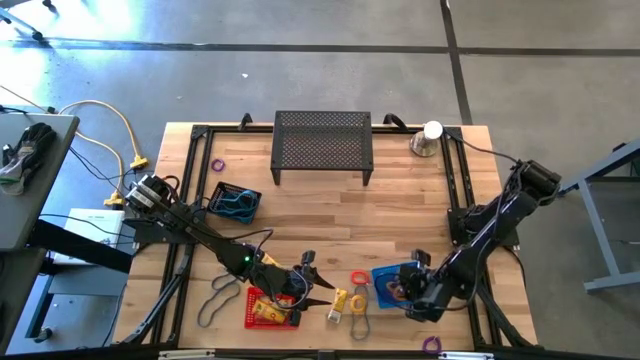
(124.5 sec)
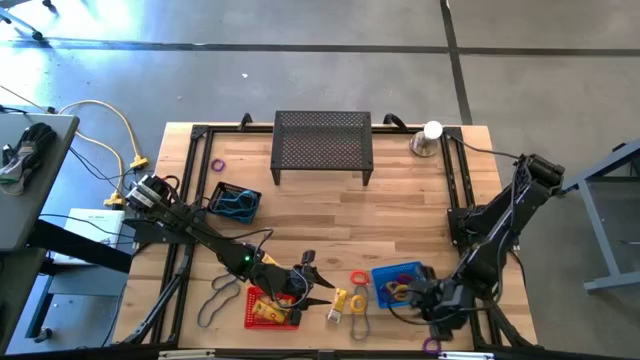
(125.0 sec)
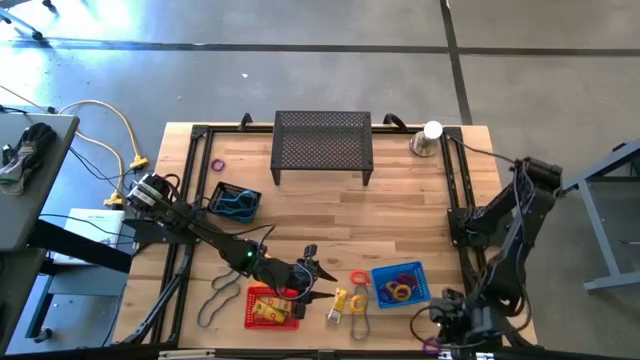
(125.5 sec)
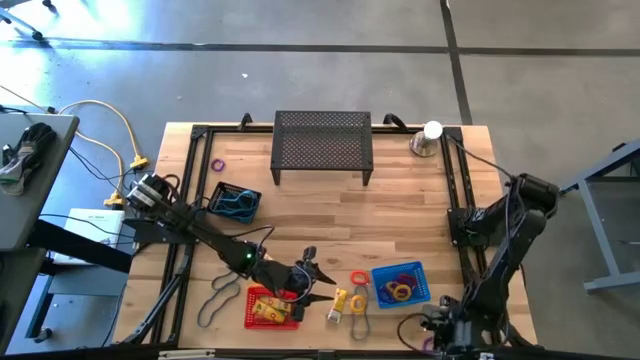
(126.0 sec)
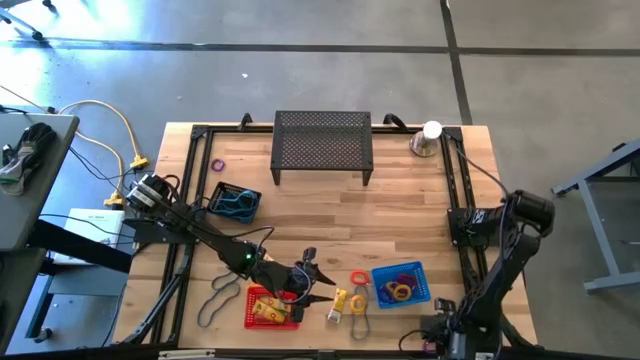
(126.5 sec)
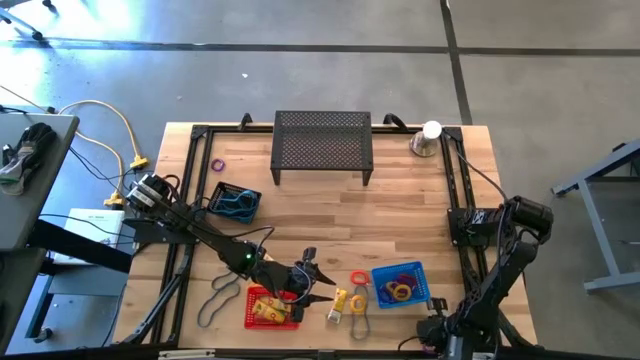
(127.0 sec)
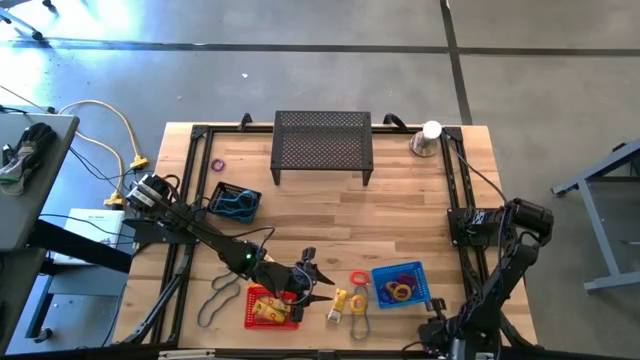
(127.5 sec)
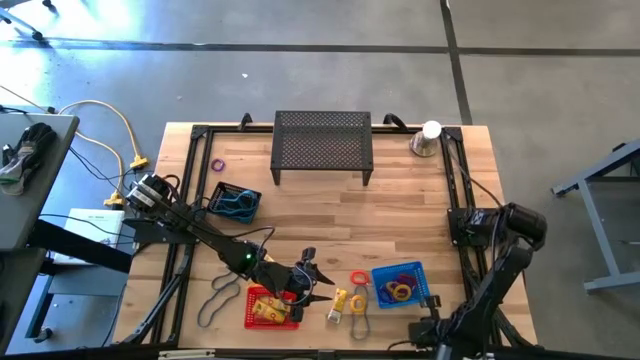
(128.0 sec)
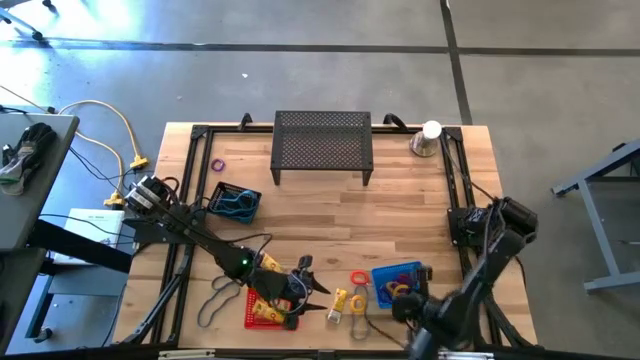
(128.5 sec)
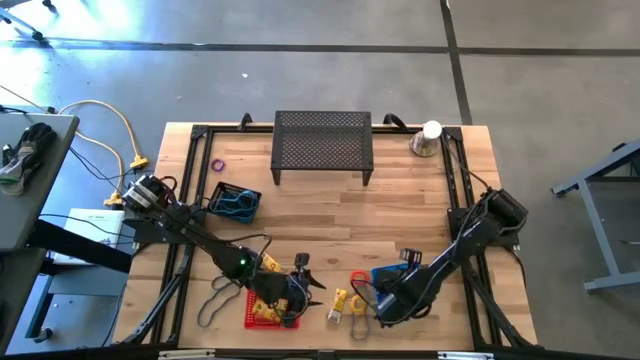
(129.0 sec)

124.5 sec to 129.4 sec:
Task: Pick & Place Office Desk Supplies
Put the violet spring keychain into the blue bin

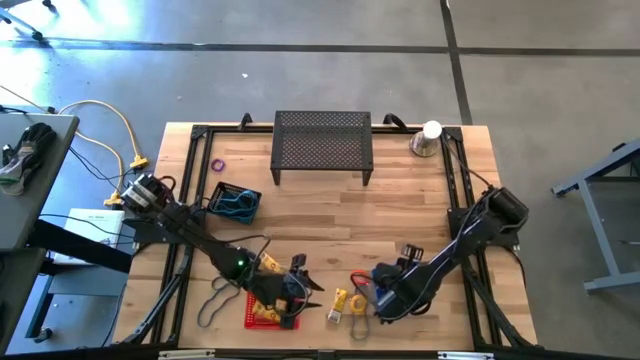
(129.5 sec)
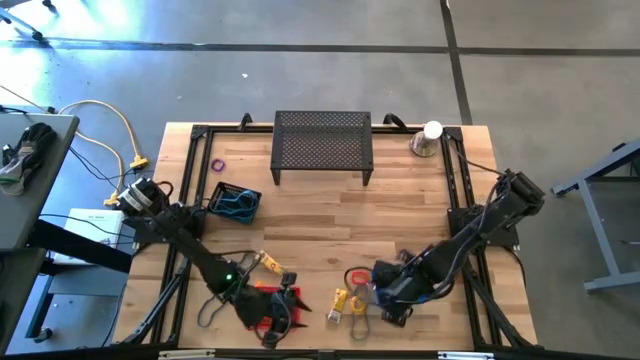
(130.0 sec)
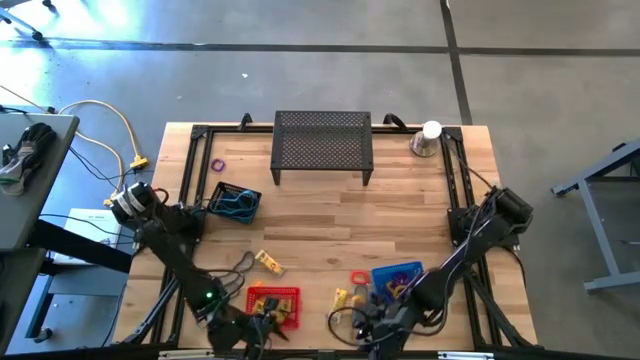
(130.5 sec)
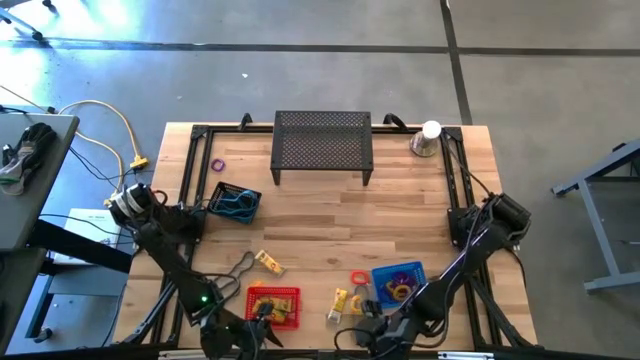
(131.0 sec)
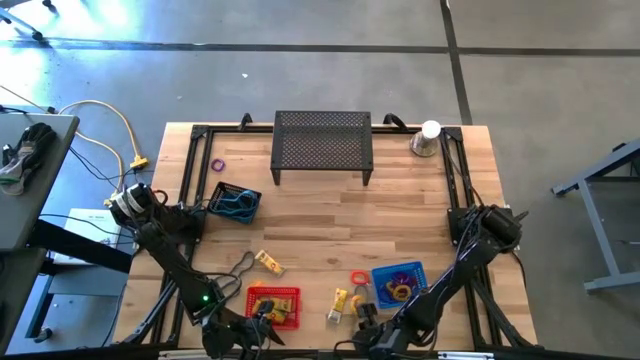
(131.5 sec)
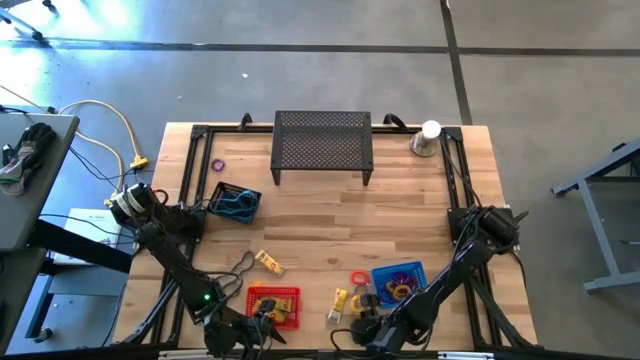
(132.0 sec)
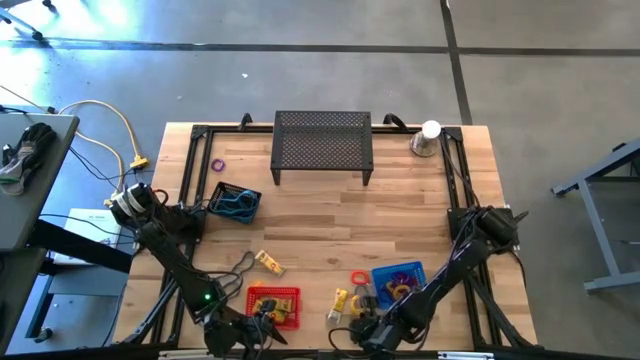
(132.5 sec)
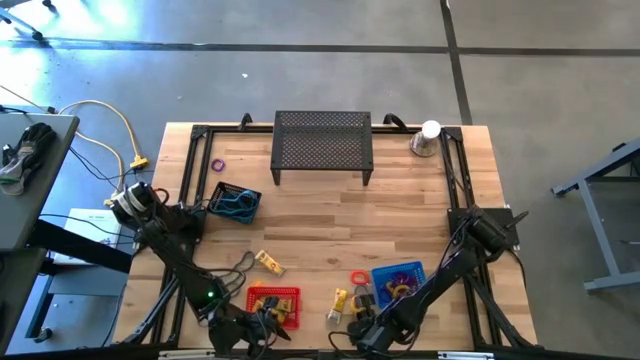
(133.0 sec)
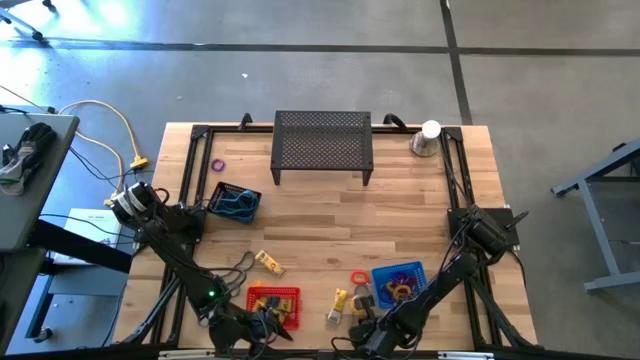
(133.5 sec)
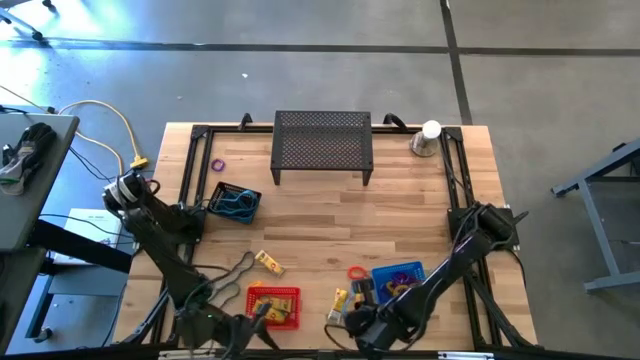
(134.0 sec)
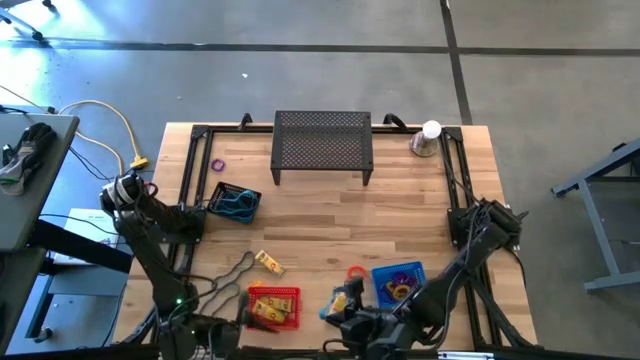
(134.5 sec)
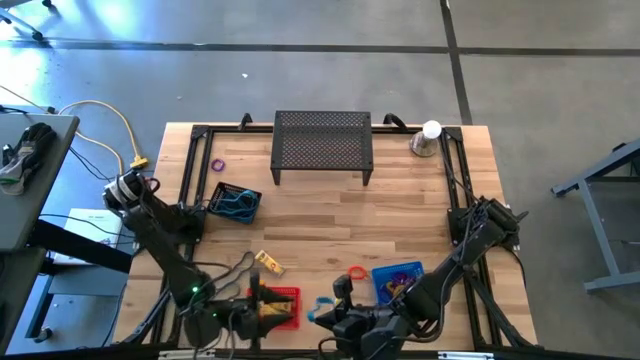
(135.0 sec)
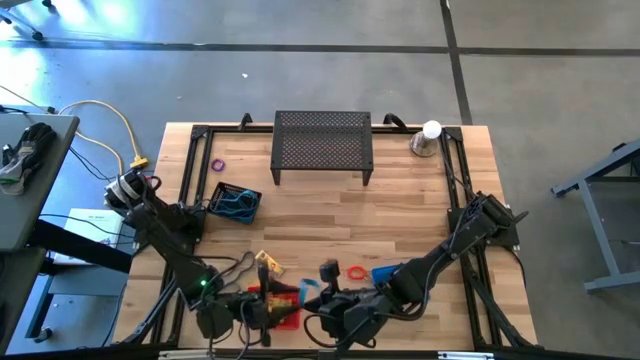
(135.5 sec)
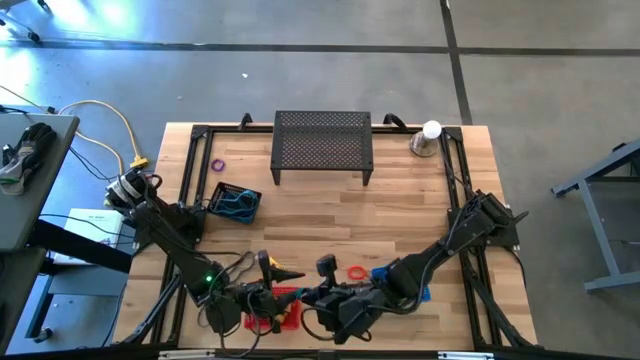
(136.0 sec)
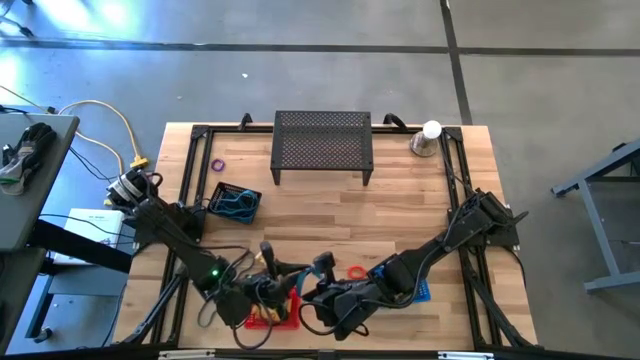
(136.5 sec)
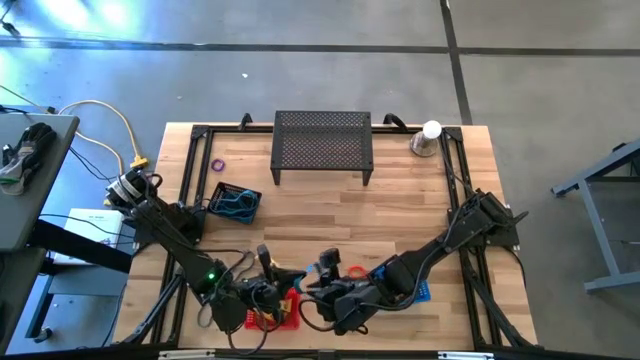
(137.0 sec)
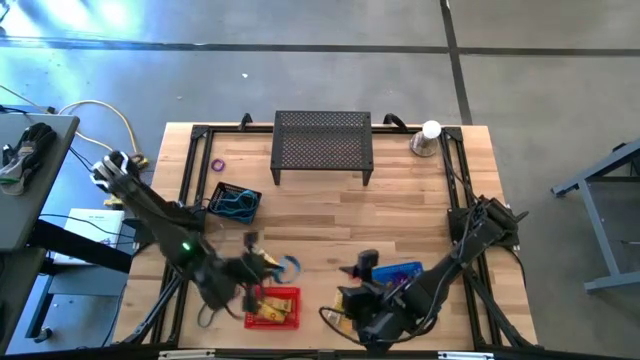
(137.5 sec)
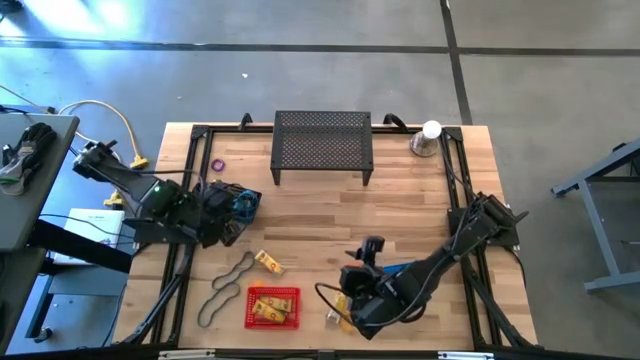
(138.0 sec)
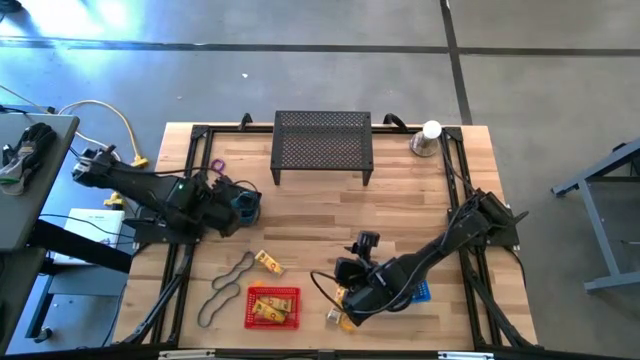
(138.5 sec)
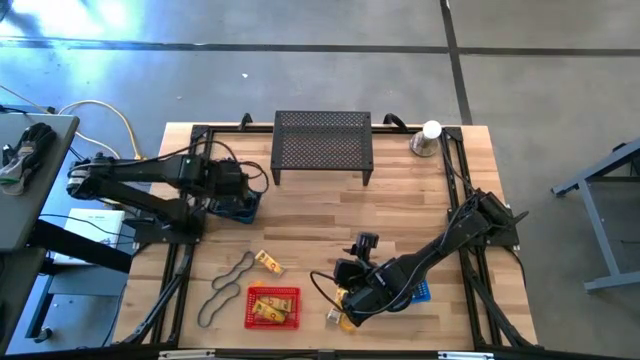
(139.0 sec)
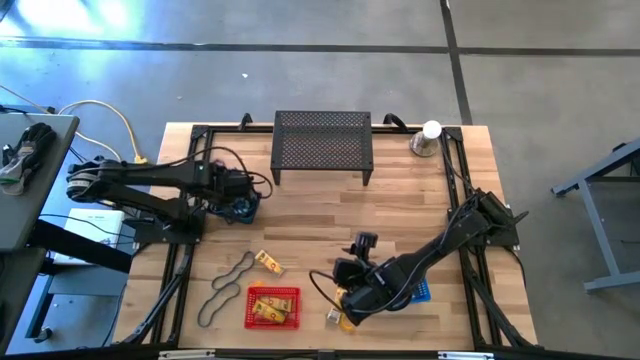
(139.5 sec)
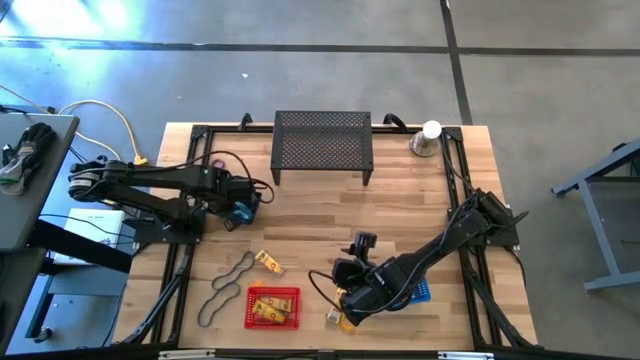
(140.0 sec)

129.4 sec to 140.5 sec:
Put the blue rubber band into the black bin

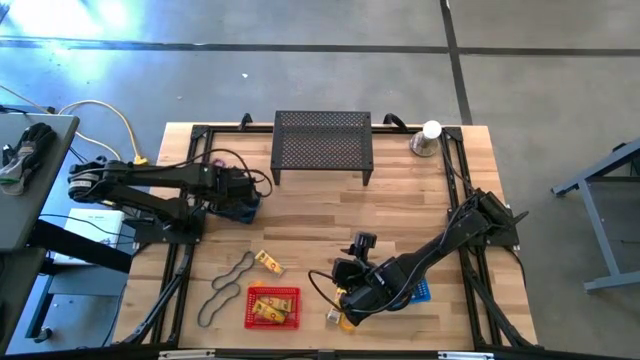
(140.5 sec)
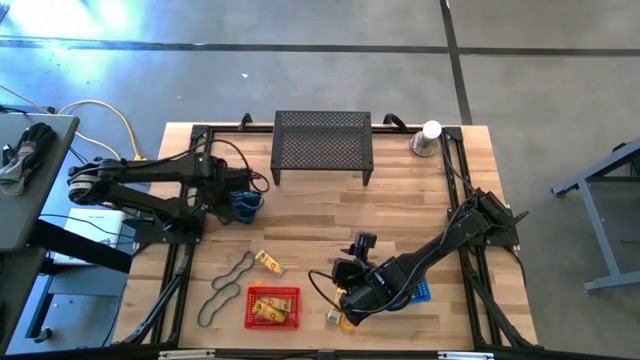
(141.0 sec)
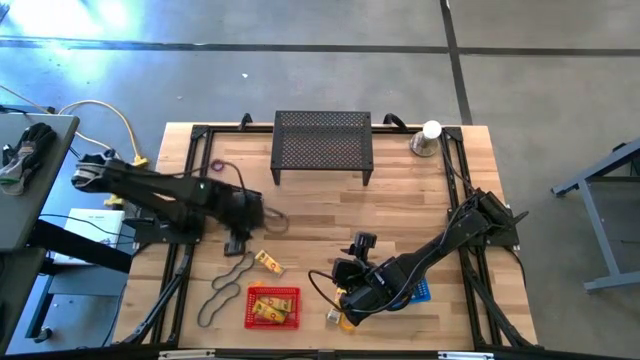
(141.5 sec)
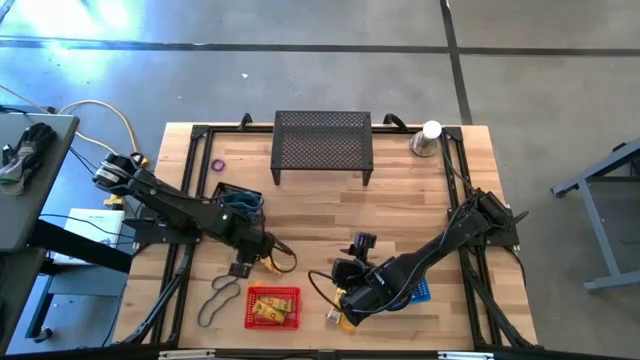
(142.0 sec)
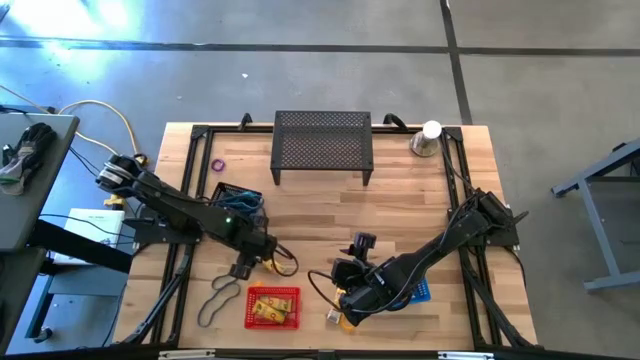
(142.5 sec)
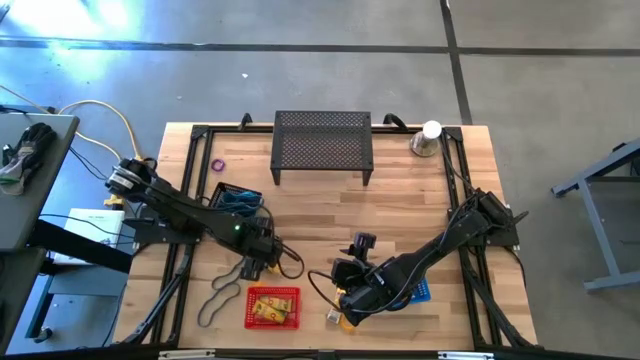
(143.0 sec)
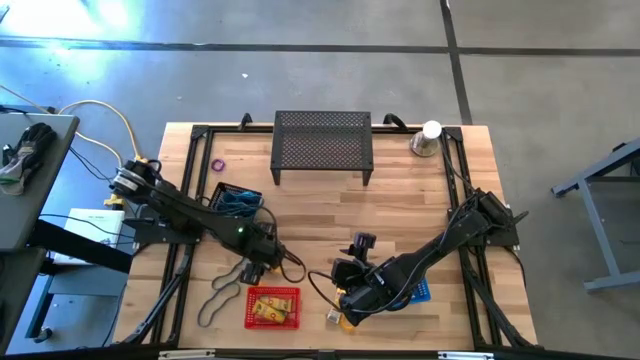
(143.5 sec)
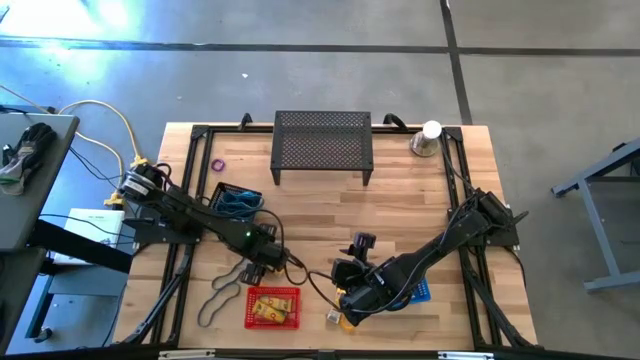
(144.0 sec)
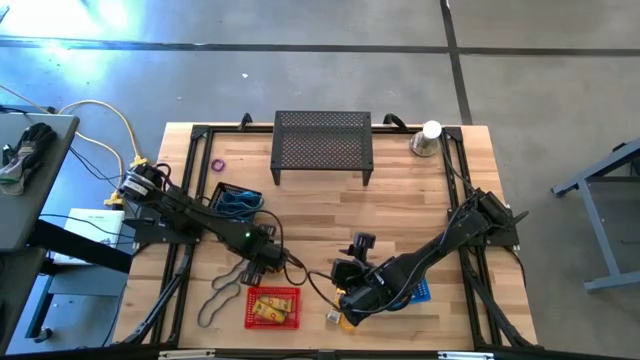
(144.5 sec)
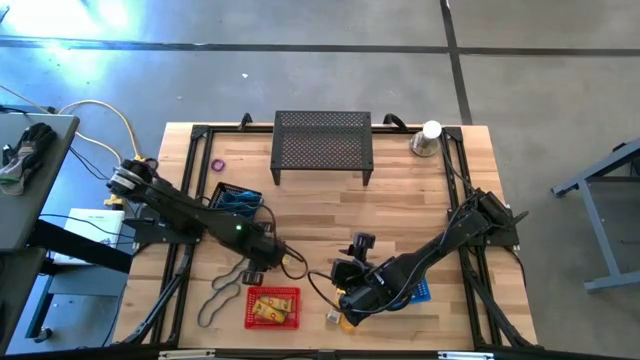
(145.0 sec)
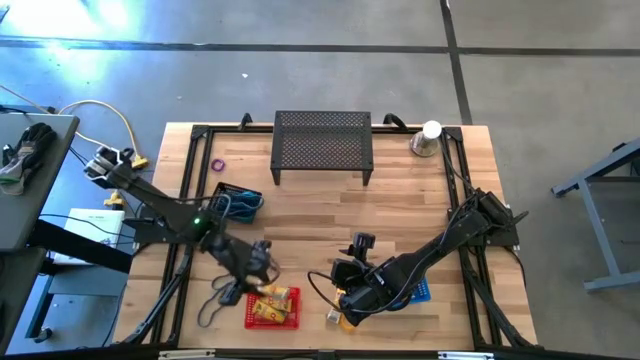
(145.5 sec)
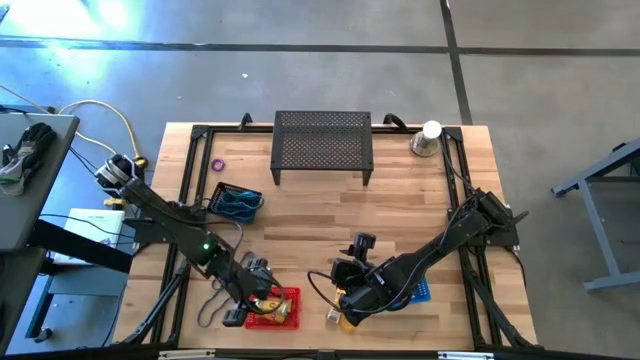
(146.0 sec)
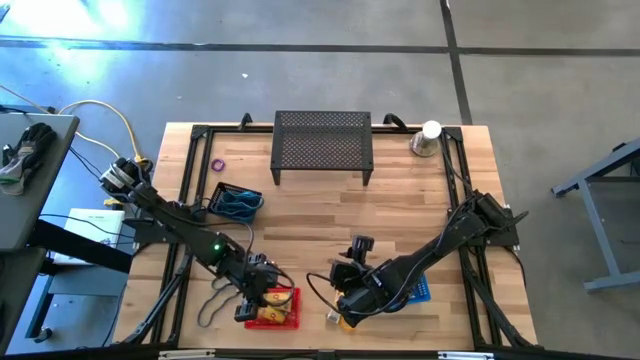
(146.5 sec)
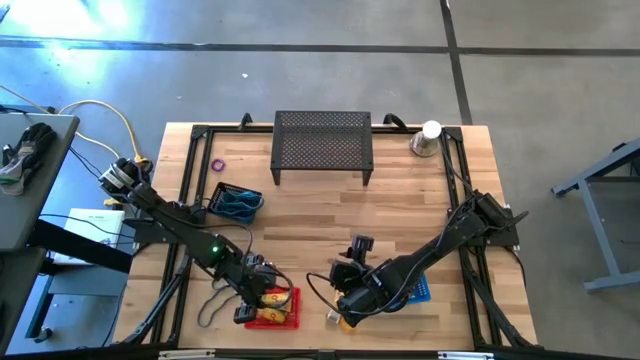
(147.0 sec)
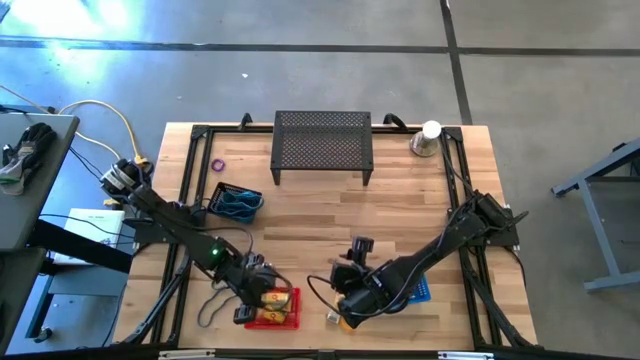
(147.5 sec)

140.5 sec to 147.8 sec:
Put the yellow crayon box into the red bin
